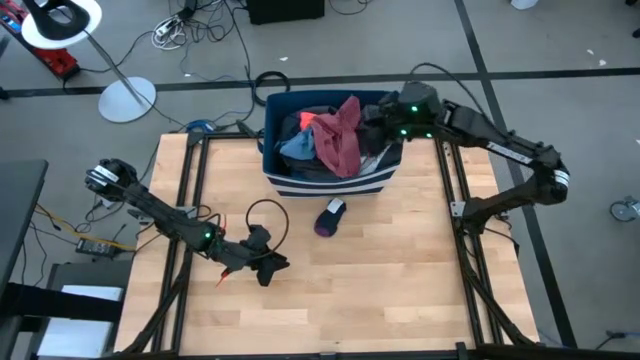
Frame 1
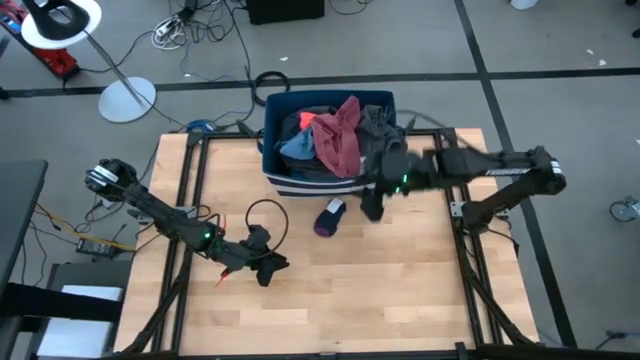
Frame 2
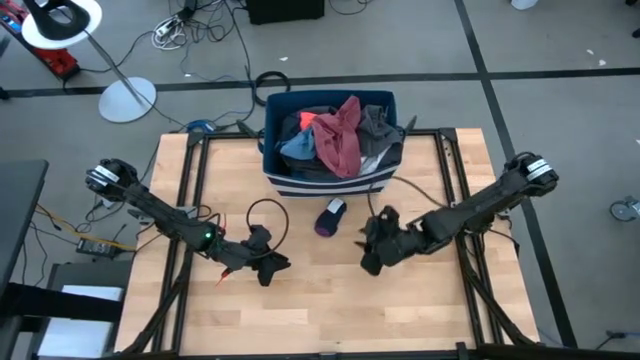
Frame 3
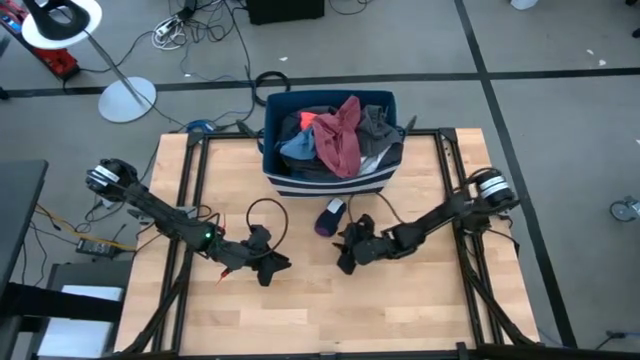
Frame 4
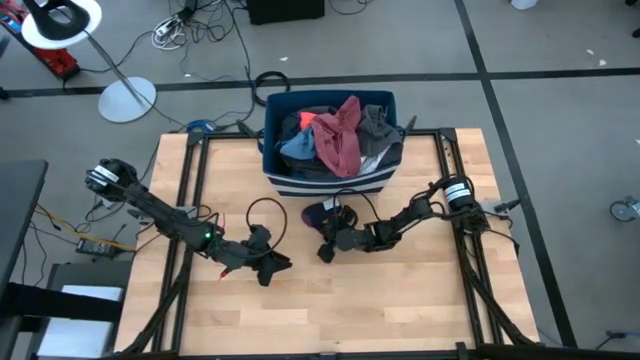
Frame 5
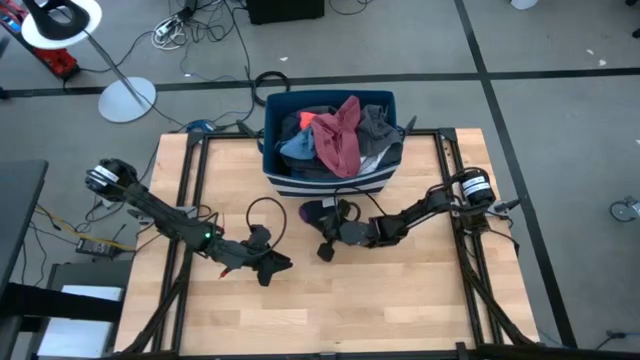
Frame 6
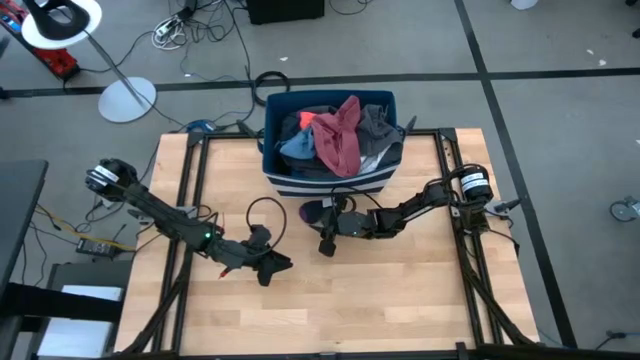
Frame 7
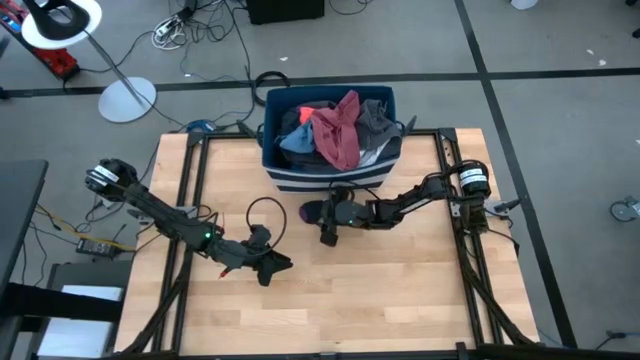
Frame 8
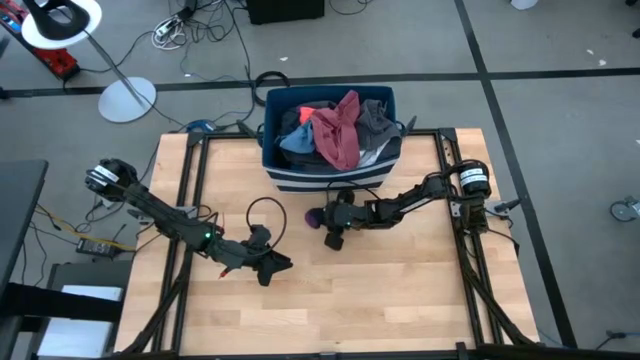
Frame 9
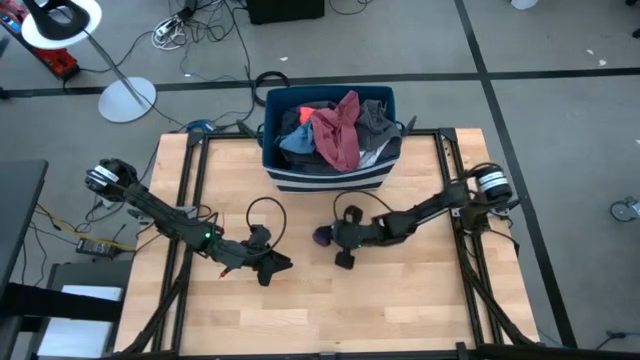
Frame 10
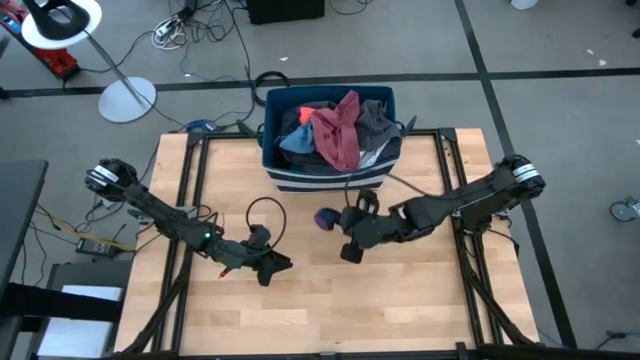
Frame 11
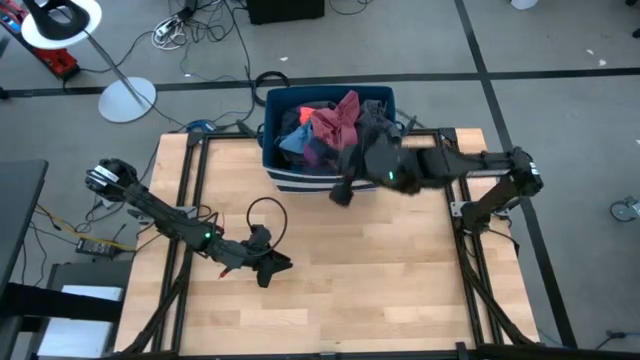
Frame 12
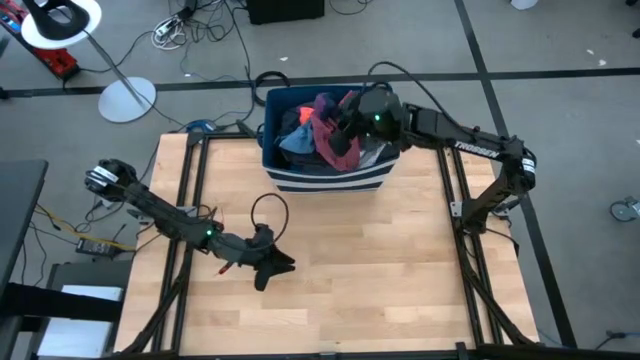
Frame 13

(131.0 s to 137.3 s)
Task: Sort clothes
Put the purple sock into the laundry bin

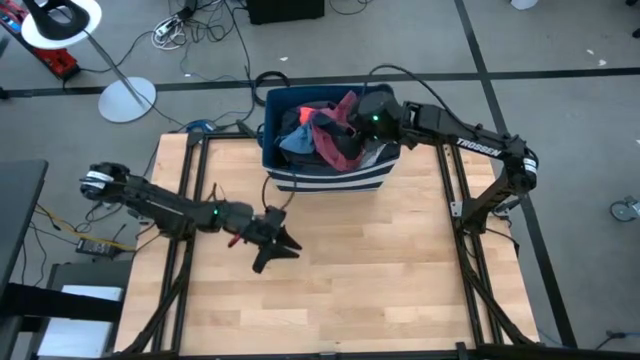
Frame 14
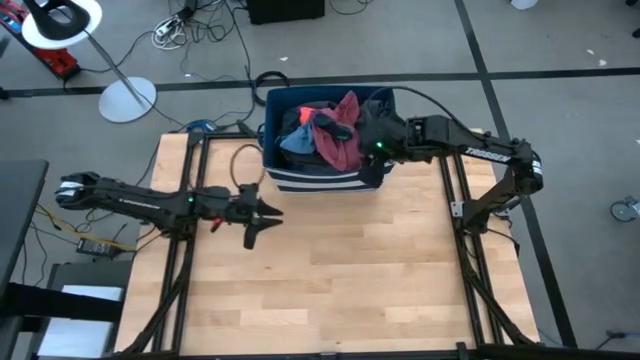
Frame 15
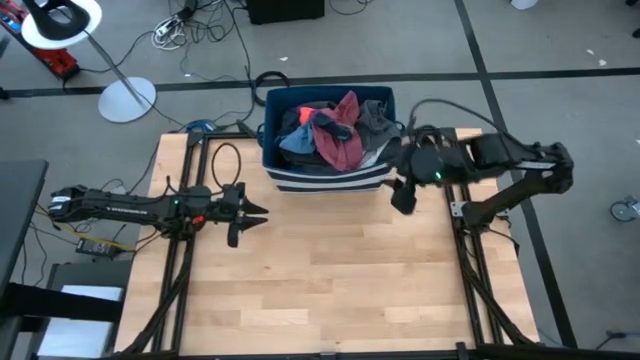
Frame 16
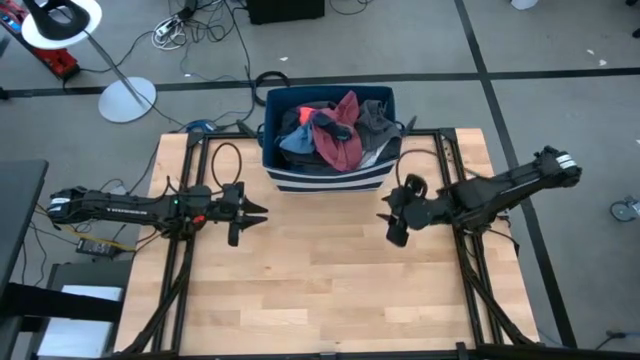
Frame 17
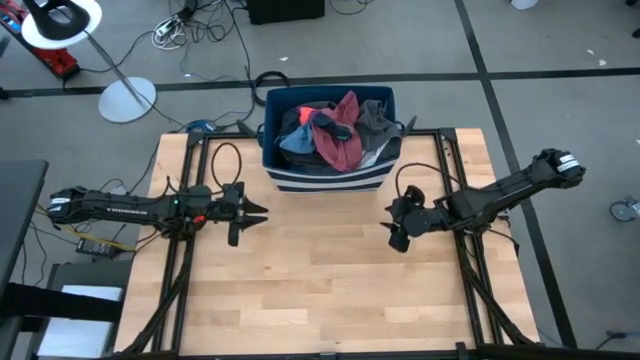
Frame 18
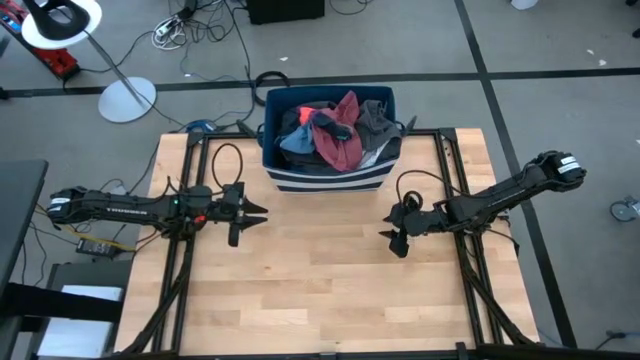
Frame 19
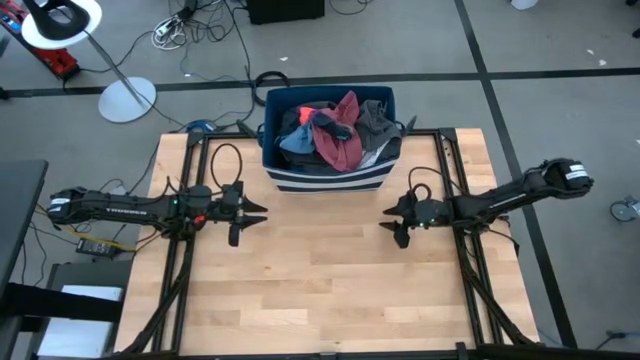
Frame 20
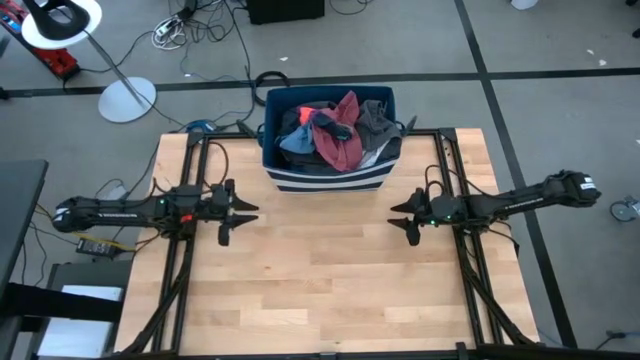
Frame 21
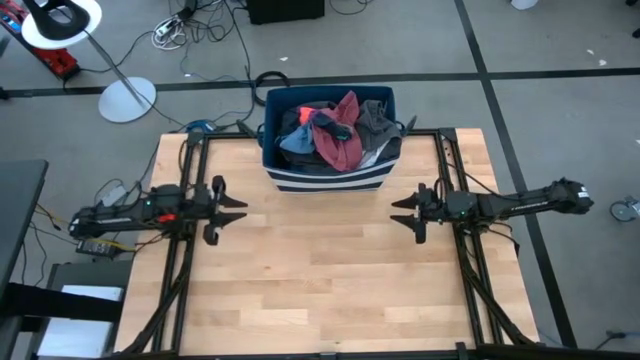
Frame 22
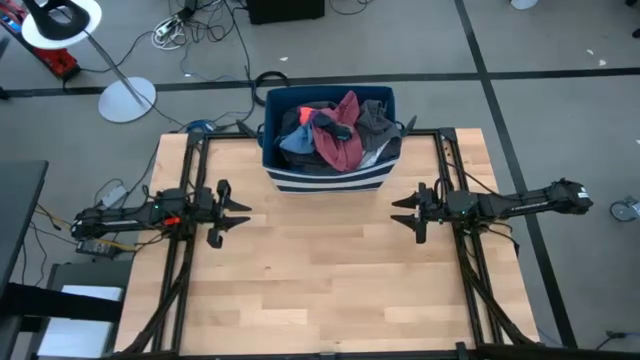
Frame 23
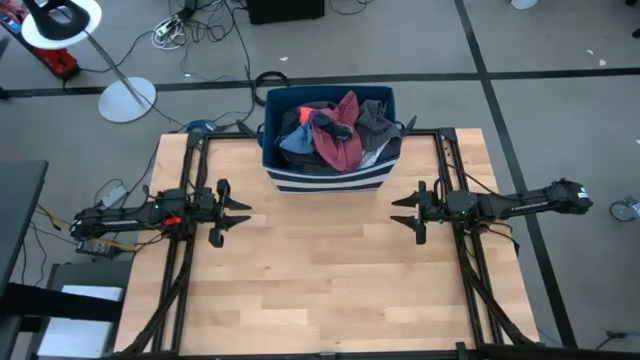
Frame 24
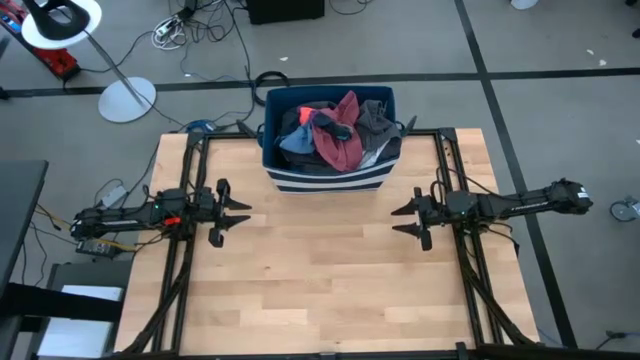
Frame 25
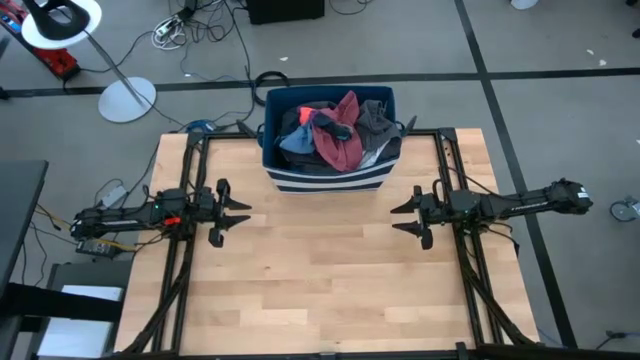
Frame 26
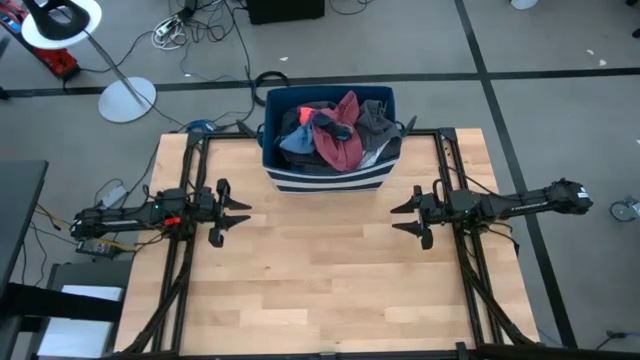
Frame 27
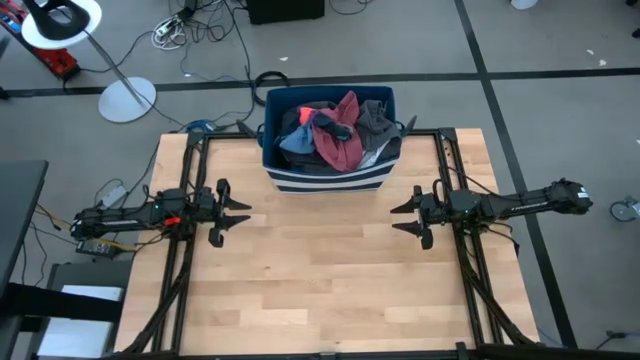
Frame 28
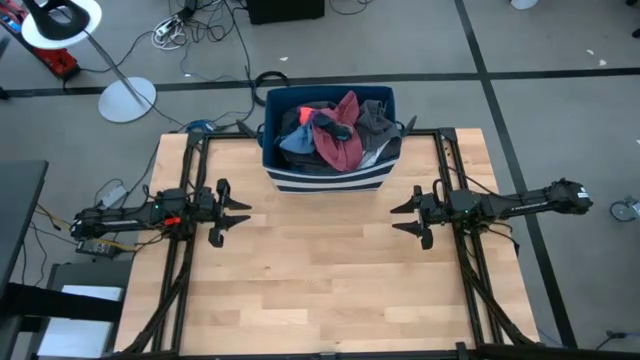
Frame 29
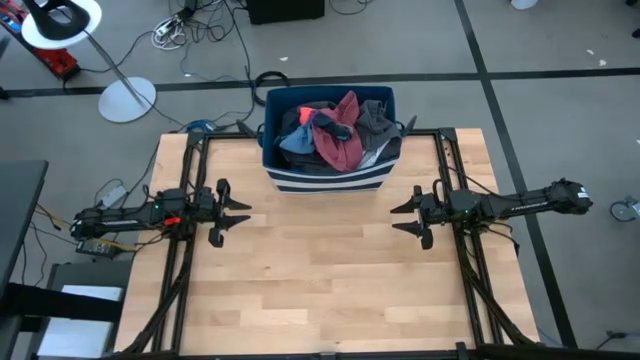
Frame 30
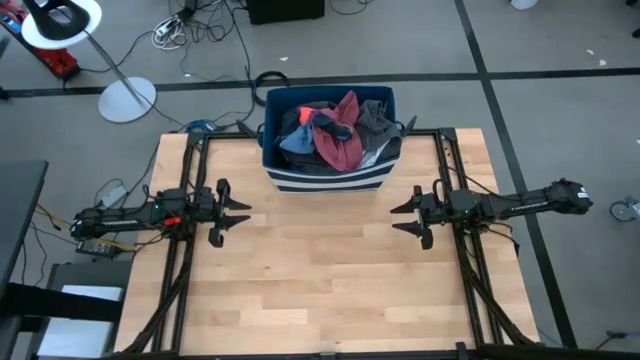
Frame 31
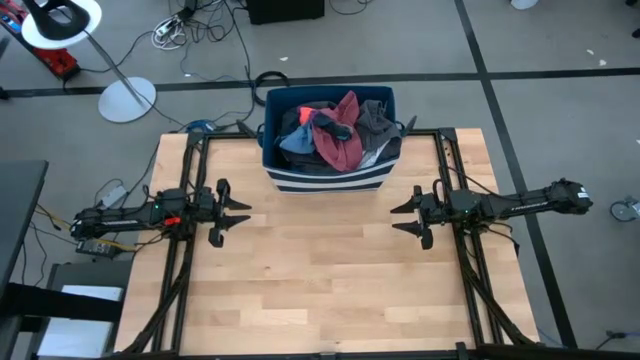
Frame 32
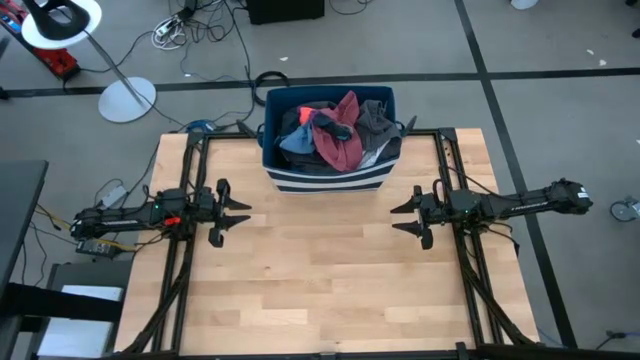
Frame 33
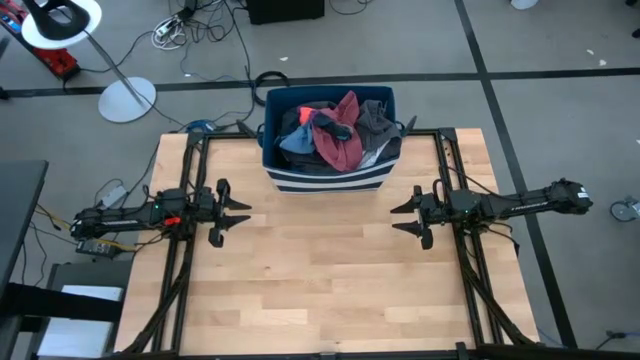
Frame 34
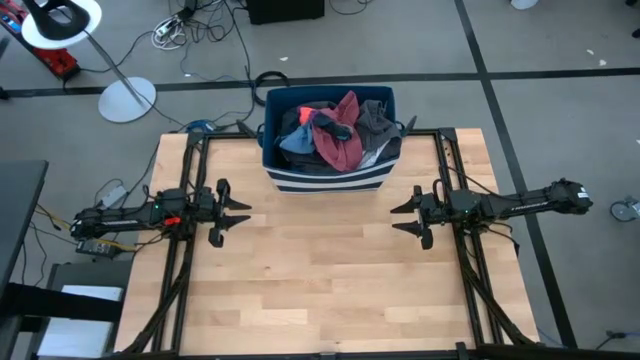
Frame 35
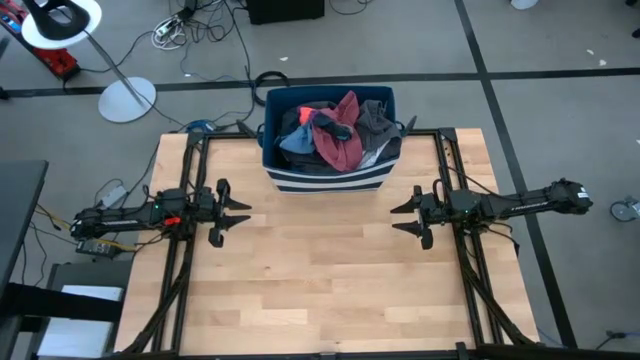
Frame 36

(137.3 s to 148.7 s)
Return to Home Position

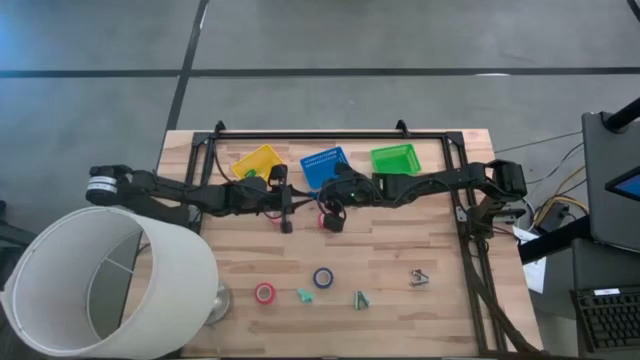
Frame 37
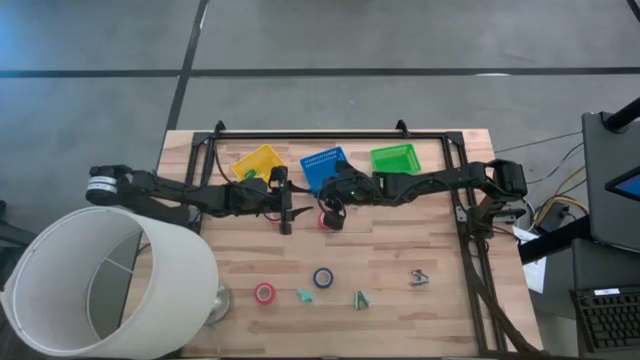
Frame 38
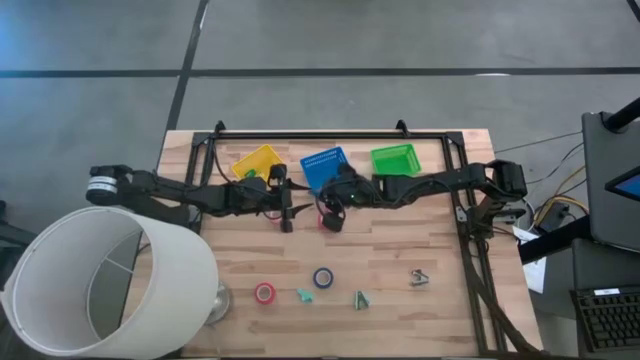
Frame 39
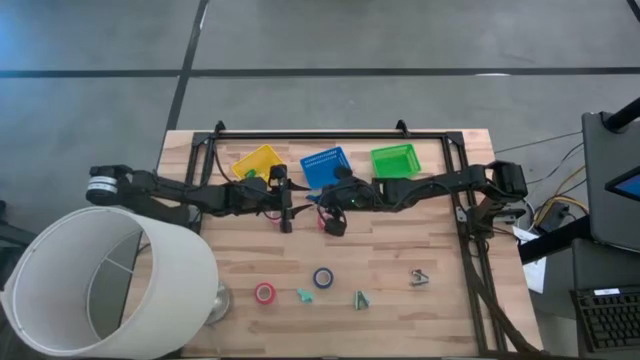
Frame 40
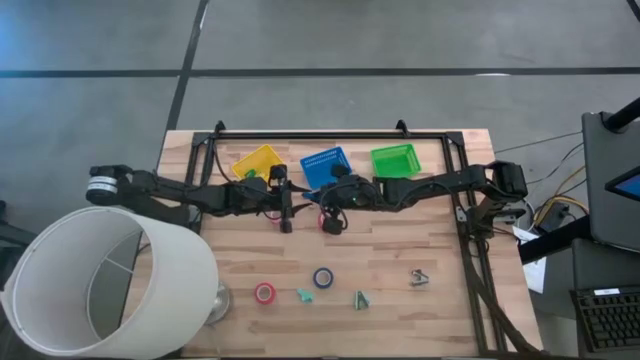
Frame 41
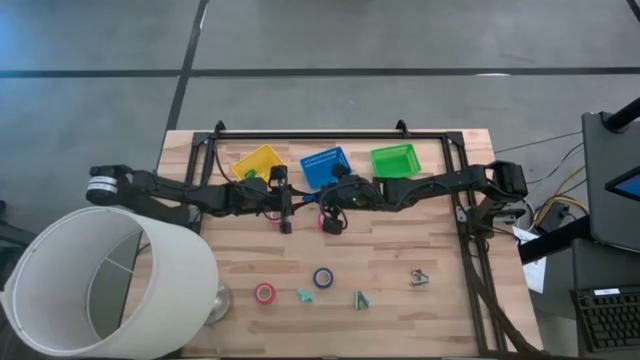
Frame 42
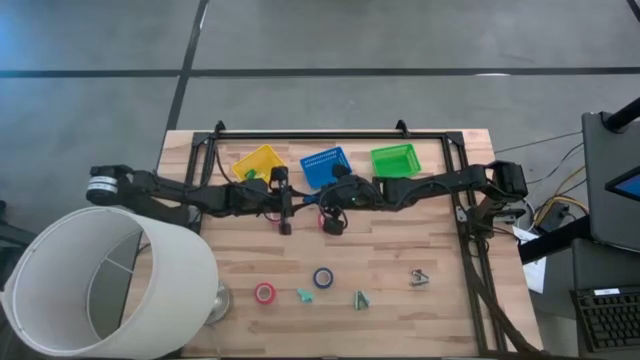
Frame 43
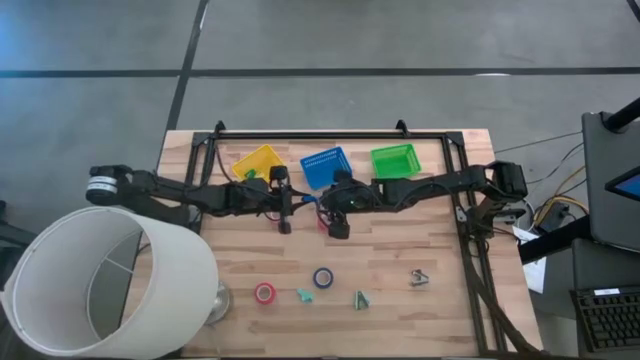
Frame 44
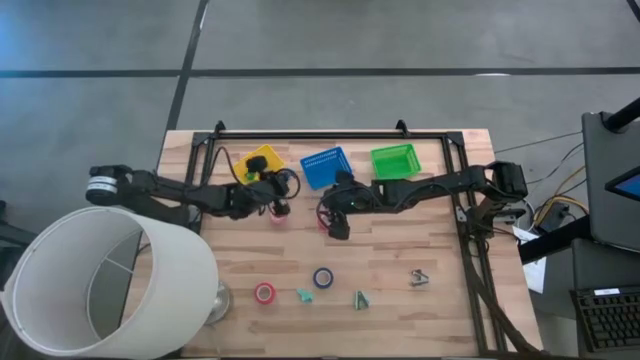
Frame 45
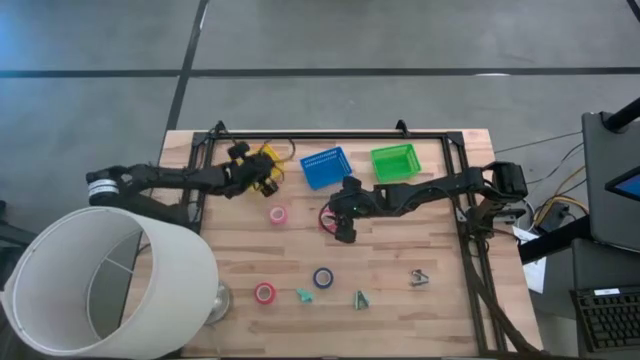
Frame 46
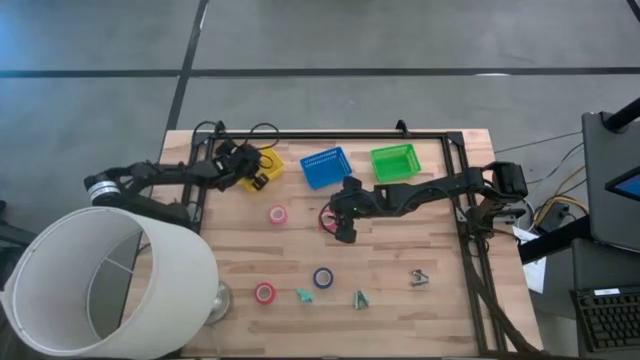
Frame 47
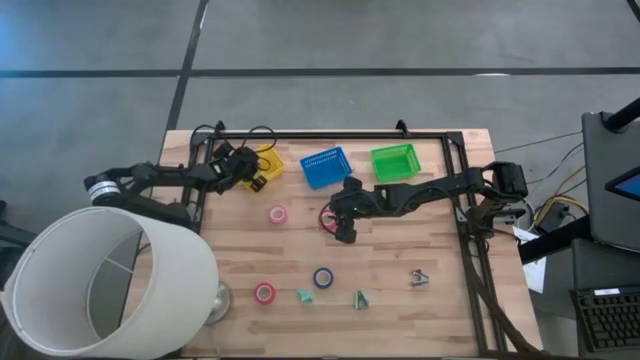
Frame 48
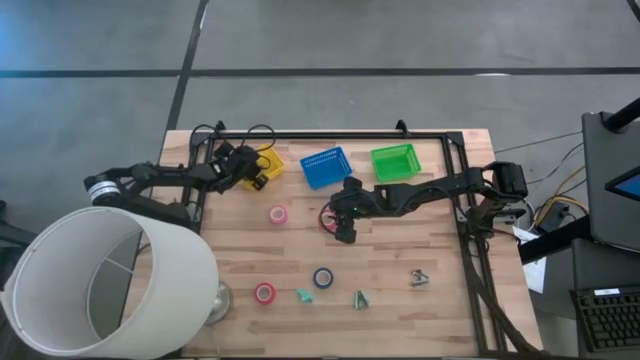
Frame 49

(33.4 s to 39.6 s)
Task: Pick and place Stapler, Stapler remover, tape
Put the blue stapler into the yellow basket
